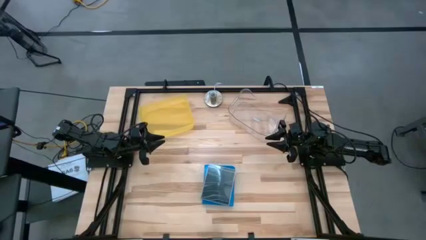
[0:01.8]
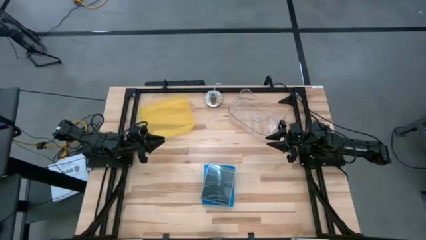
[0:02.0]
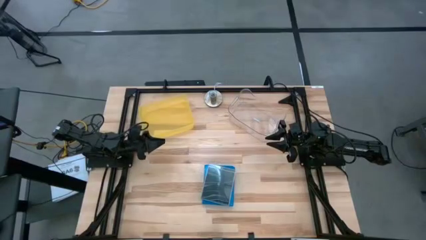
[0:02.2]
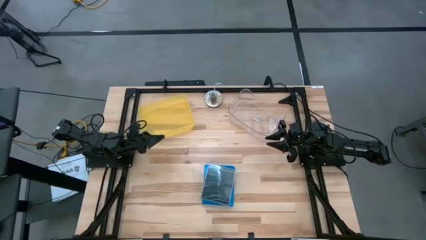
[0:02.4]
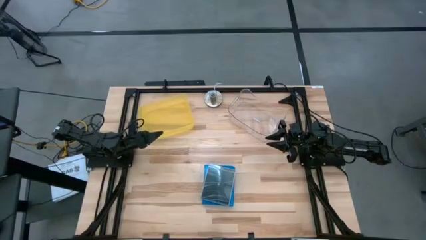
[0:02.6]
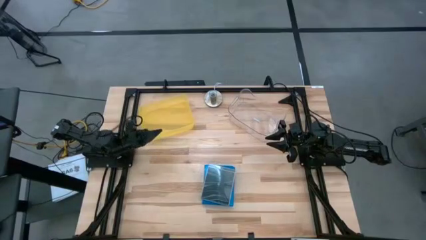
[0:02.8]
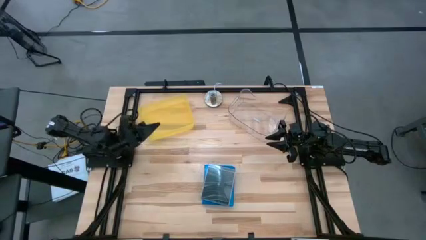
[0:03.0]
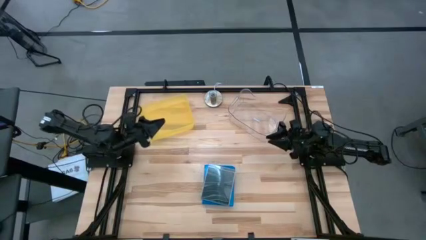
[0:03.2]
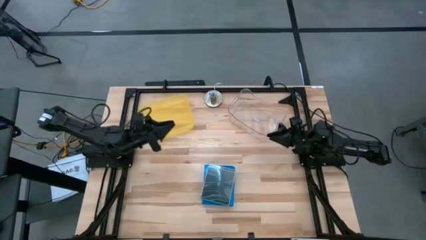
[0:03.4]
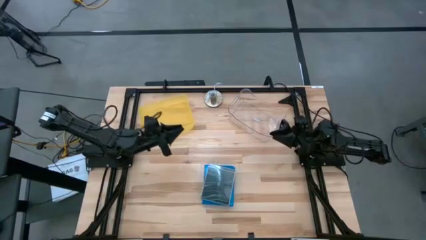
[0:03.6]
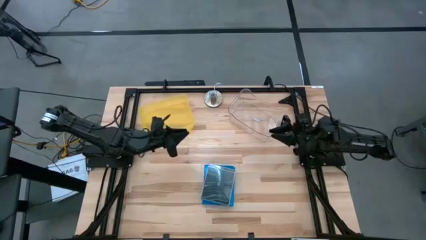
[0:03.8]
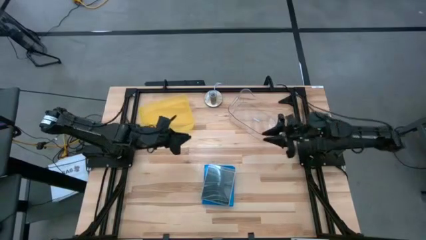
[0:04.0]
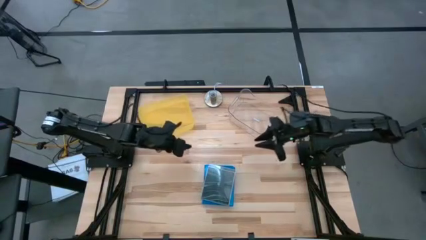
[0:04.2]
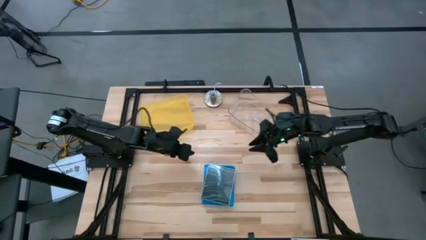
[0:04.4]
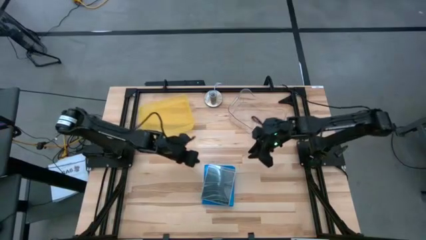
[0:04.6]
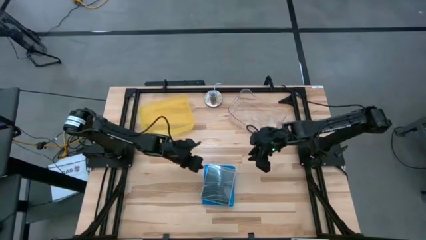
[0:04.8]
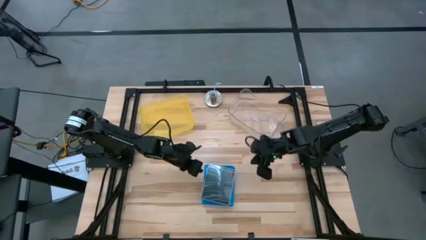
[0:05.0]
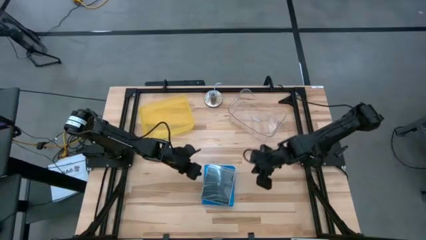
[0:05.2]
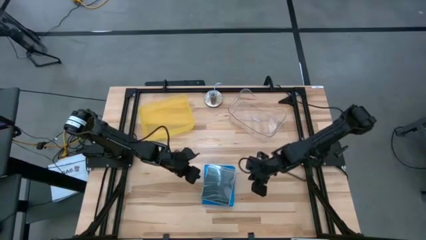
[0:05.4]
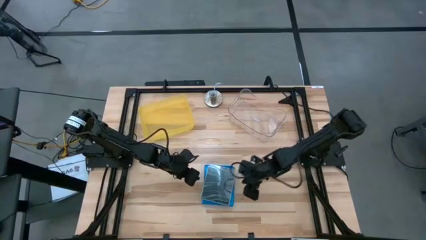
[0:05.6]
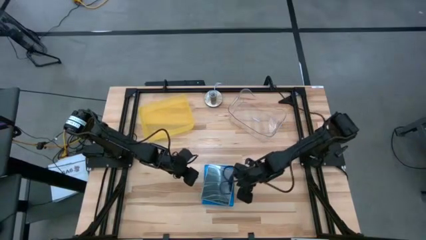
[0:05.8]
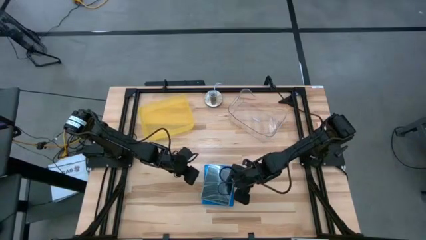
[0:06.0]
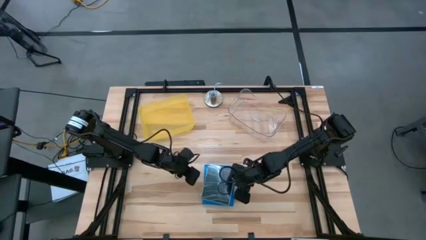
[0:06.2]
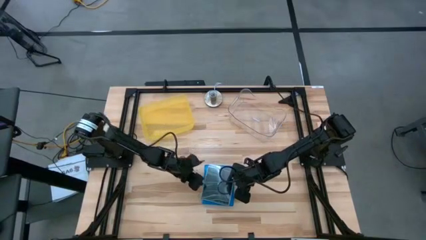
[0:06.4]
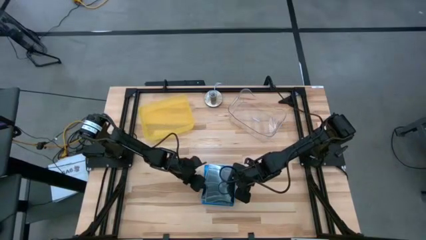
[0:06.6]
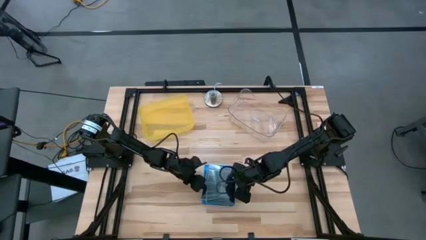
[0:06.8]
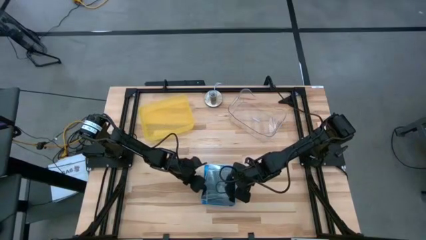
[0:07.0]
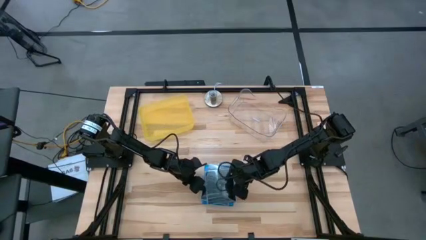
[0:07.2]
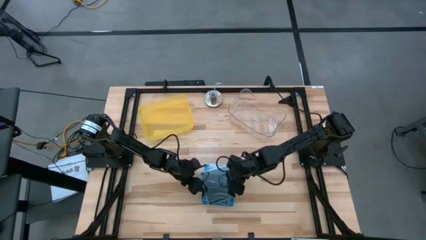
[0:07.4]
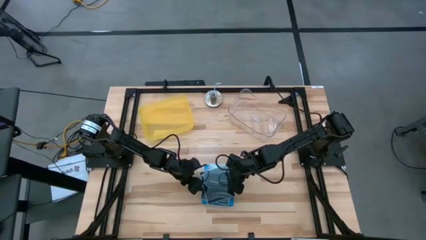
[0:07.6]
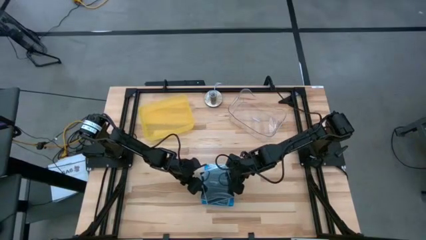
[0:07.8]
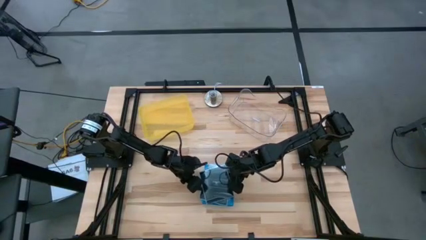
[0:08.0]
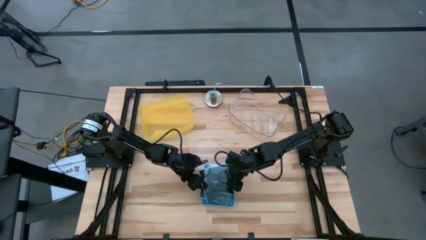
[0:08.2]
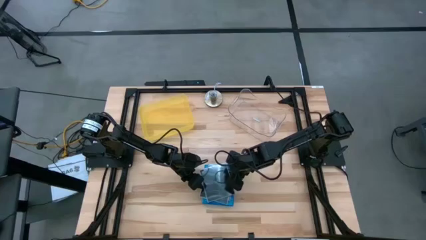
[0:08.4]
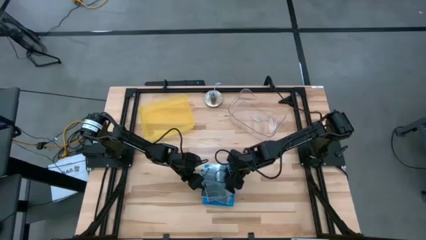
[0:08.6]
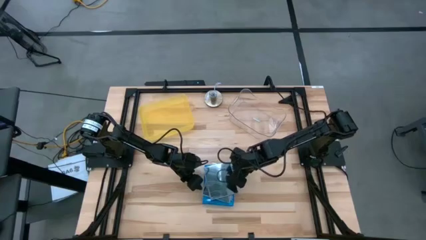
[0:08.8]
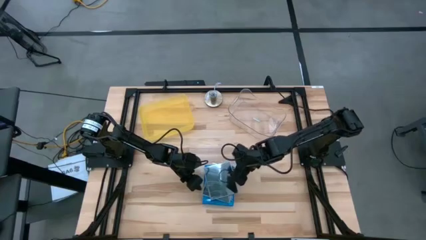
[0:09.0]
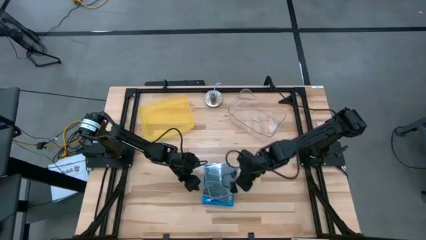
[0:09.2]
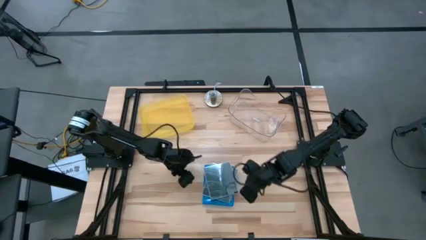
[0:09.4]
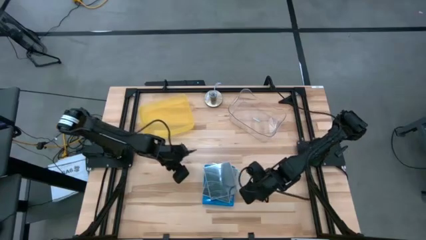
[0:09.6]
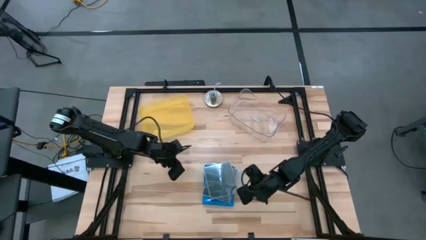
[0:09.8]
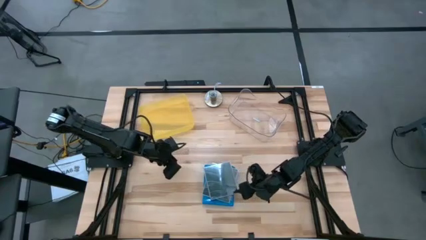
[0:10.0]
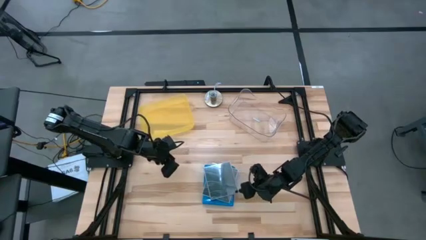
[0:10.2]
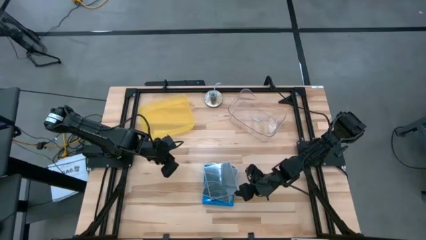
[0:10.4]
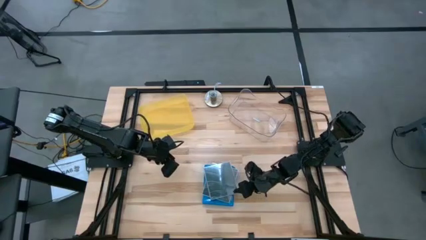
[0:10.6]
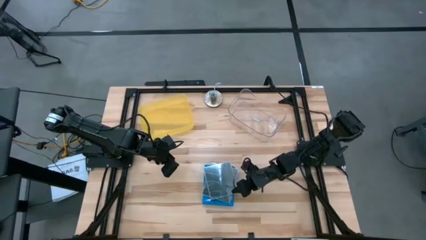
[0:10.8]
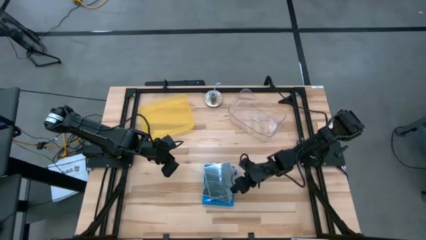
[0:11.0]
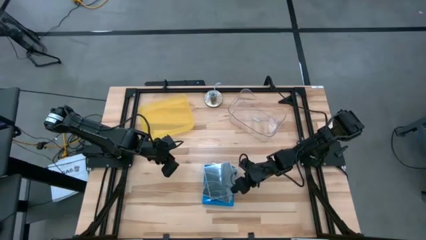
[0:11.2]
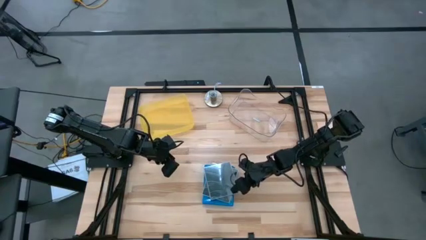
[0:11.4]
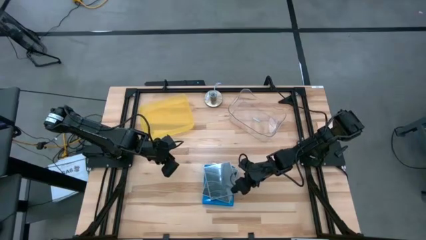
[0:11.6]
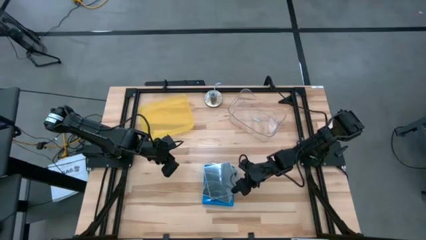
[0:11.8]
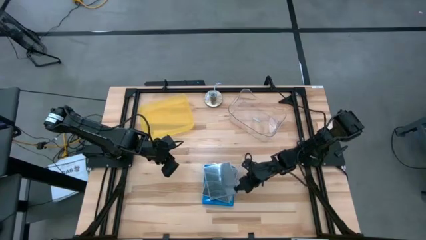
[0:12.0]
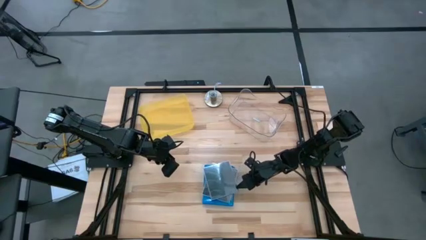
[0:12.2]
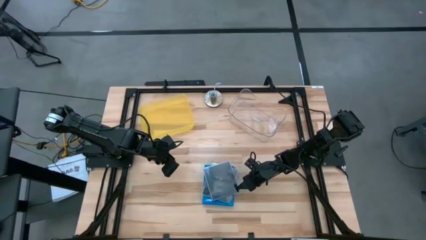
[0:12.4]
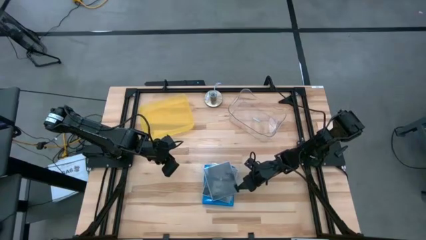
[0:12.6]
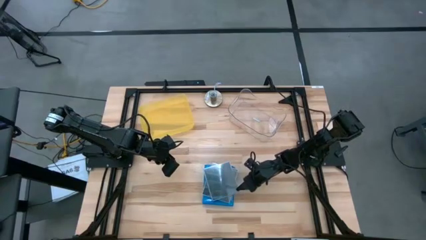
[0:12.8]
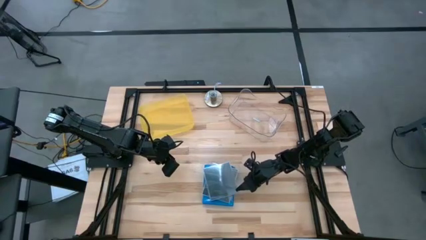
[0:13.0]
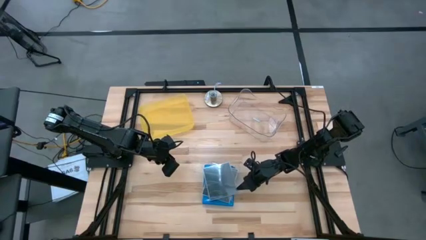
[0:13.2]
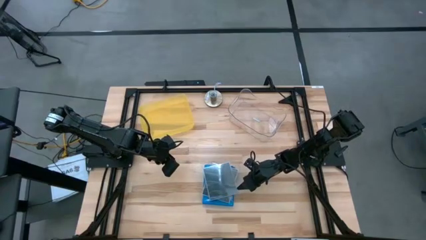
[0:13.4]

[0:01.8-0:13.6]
Task: Pick & place jewel cases by type
Put the black CD case into the transparent bin
